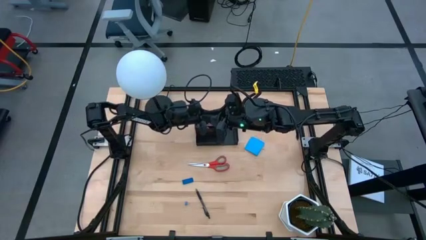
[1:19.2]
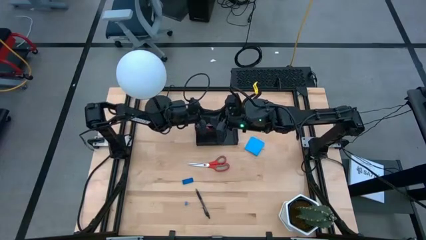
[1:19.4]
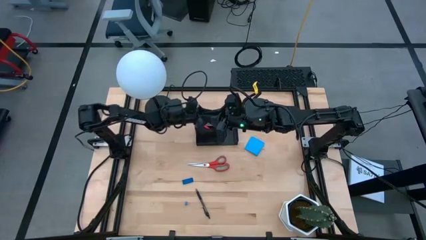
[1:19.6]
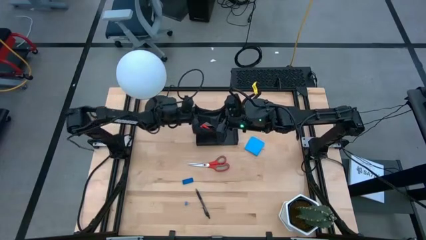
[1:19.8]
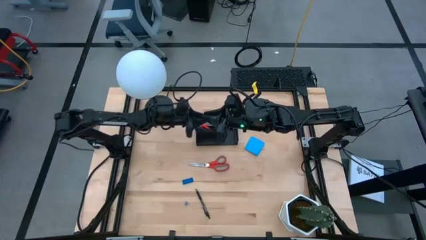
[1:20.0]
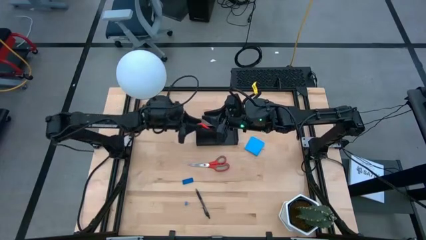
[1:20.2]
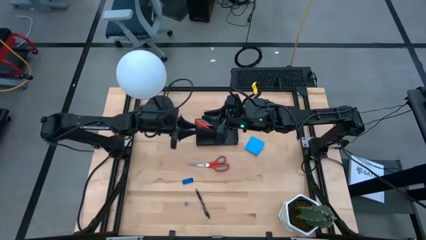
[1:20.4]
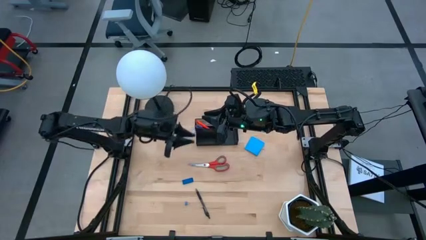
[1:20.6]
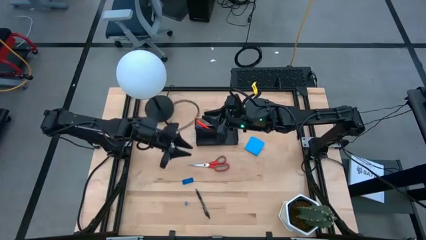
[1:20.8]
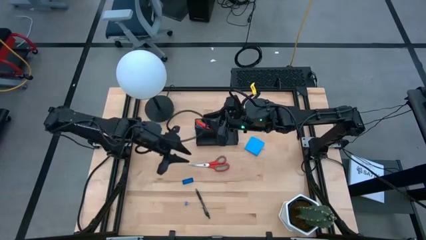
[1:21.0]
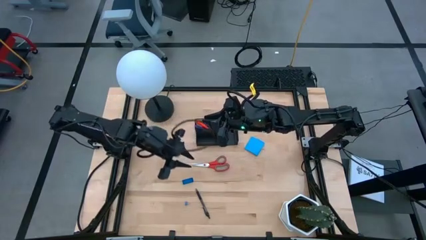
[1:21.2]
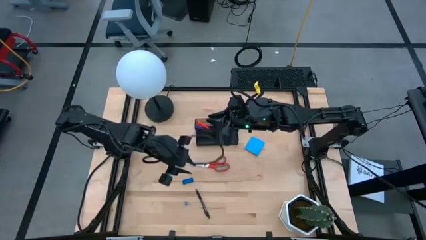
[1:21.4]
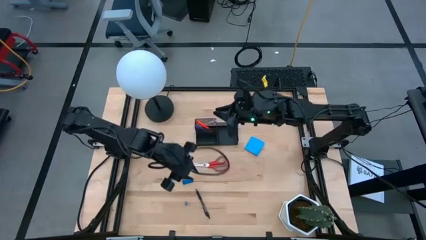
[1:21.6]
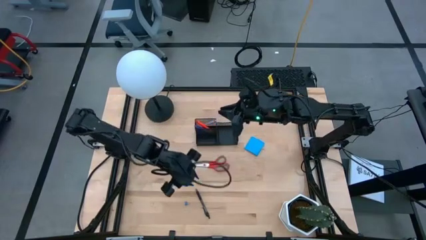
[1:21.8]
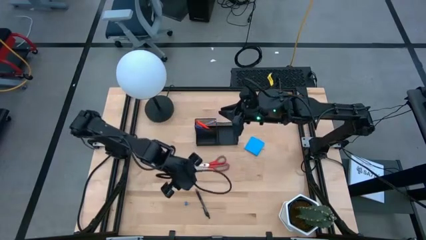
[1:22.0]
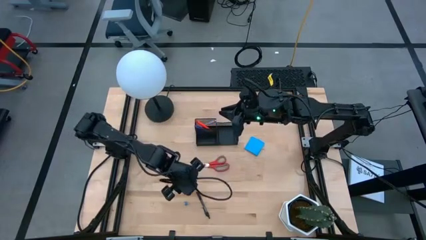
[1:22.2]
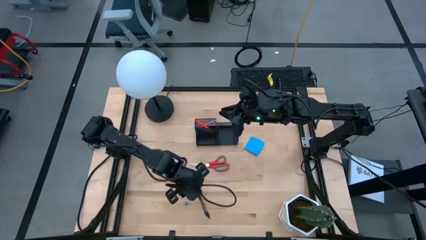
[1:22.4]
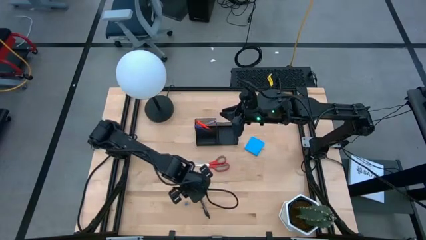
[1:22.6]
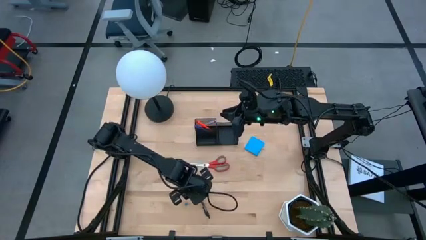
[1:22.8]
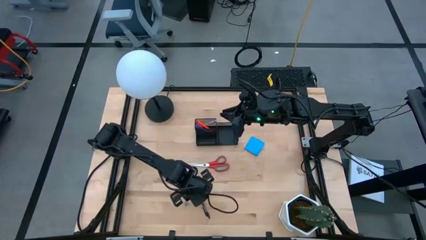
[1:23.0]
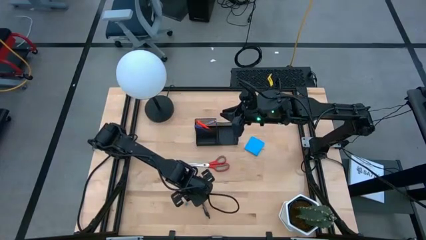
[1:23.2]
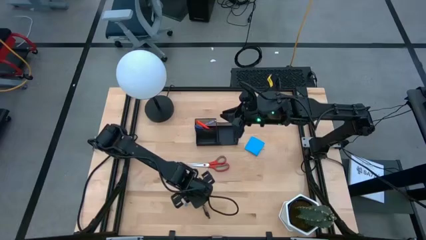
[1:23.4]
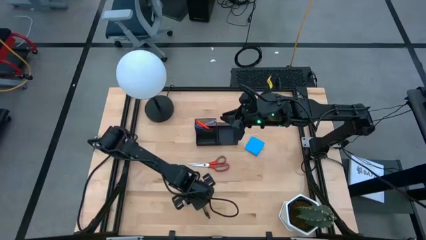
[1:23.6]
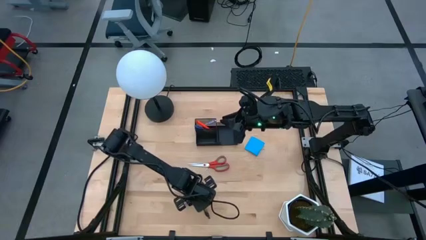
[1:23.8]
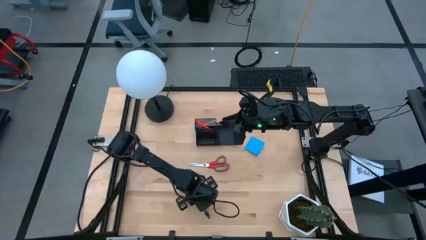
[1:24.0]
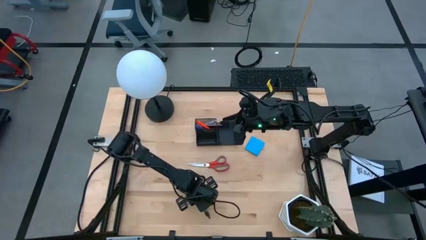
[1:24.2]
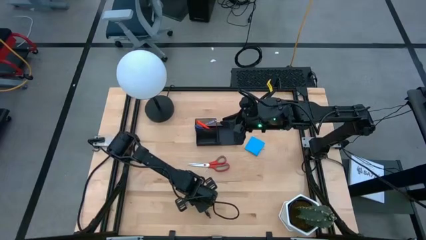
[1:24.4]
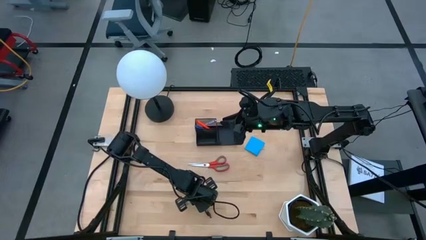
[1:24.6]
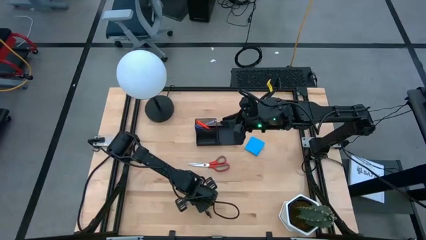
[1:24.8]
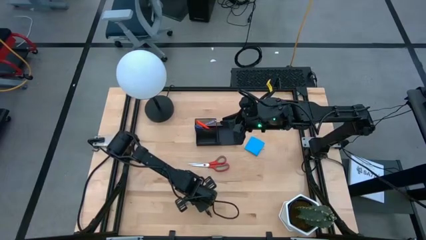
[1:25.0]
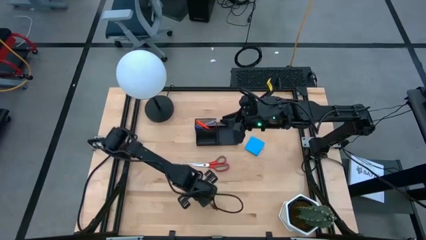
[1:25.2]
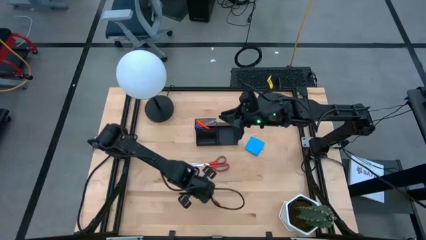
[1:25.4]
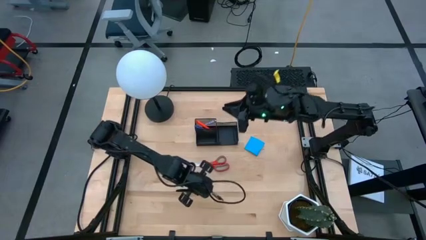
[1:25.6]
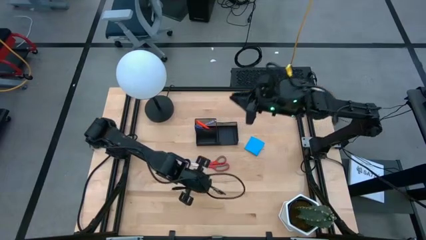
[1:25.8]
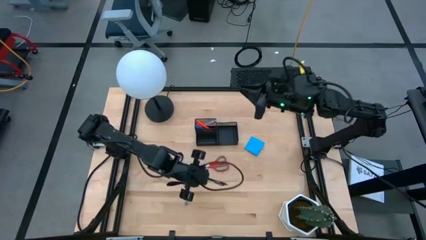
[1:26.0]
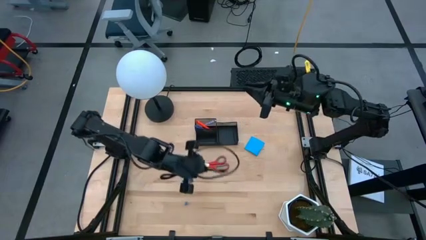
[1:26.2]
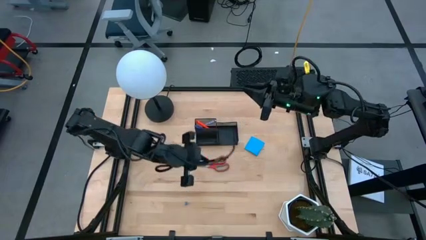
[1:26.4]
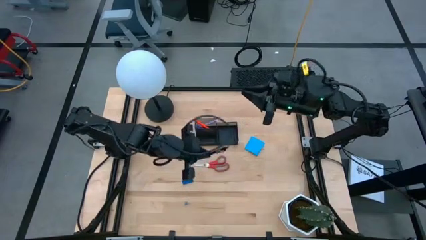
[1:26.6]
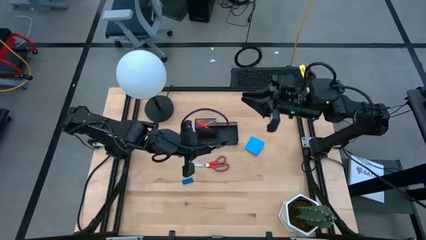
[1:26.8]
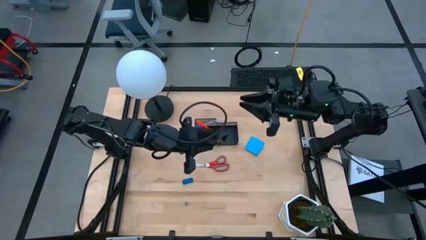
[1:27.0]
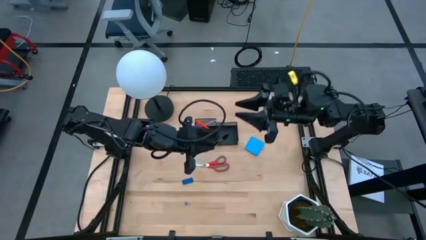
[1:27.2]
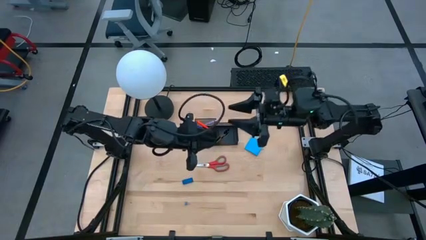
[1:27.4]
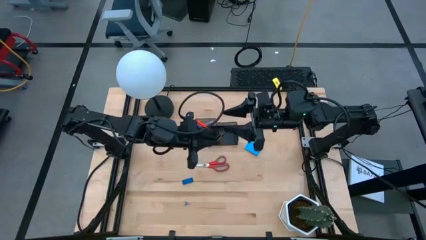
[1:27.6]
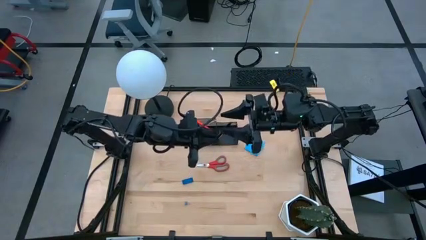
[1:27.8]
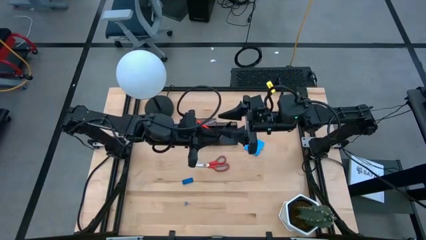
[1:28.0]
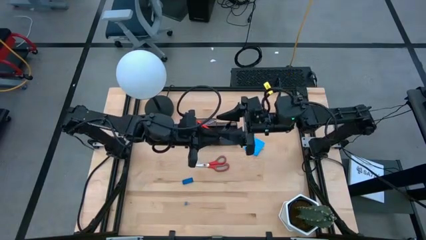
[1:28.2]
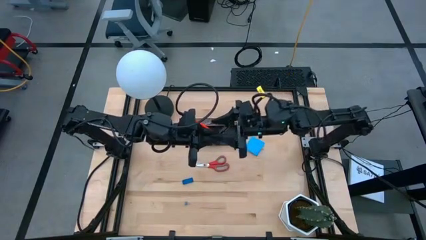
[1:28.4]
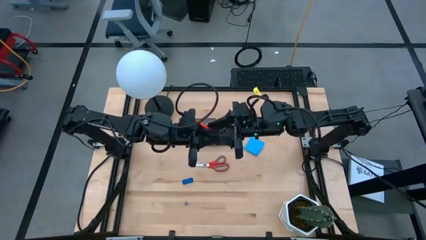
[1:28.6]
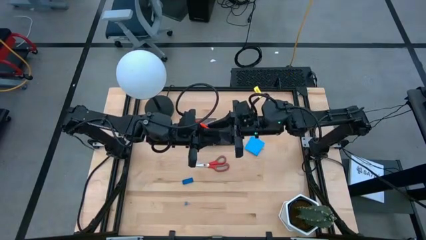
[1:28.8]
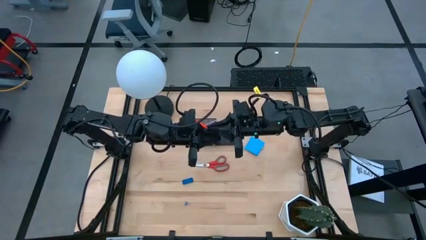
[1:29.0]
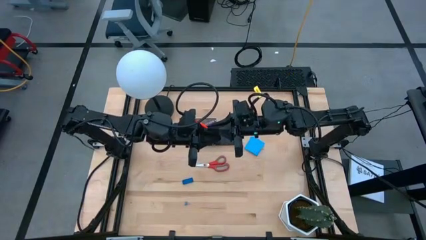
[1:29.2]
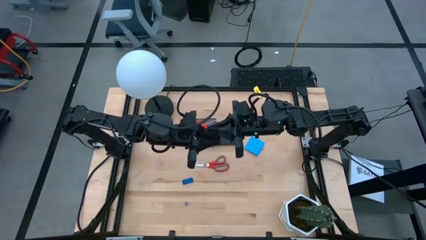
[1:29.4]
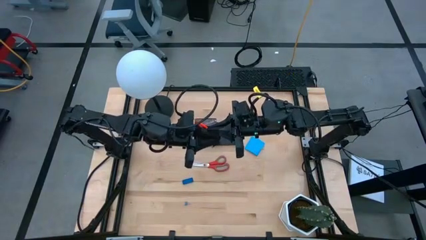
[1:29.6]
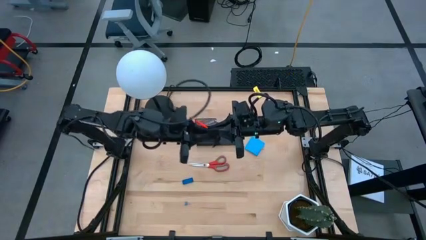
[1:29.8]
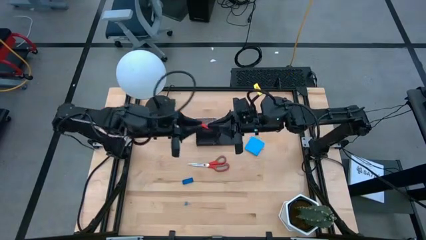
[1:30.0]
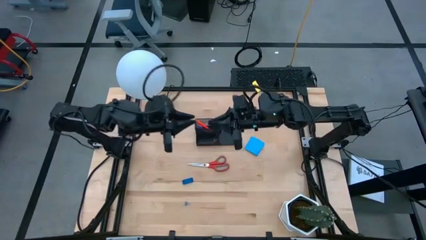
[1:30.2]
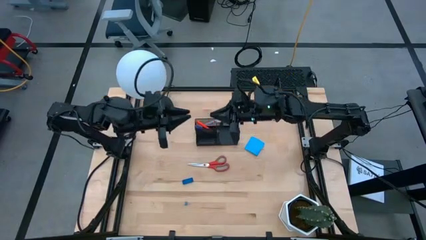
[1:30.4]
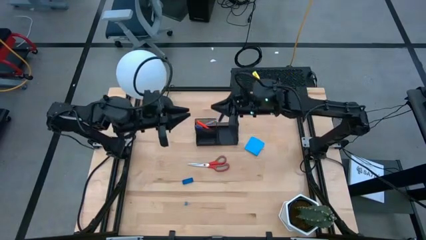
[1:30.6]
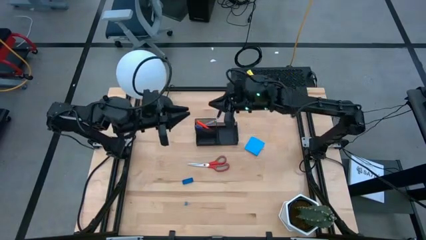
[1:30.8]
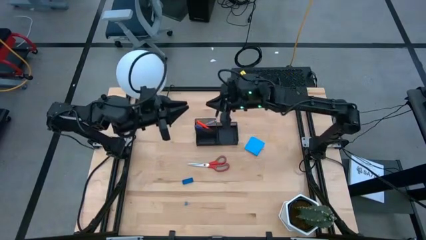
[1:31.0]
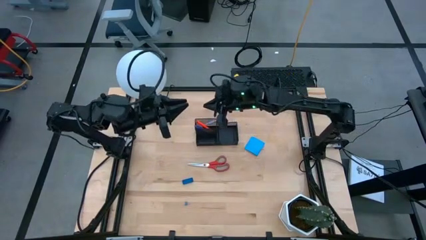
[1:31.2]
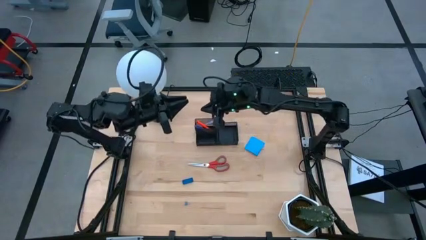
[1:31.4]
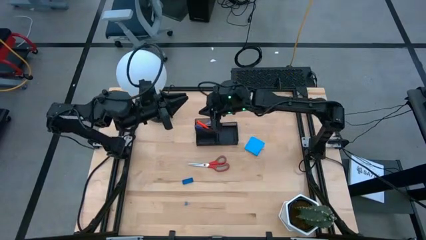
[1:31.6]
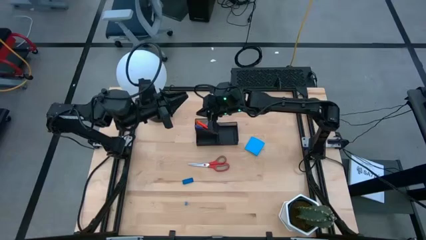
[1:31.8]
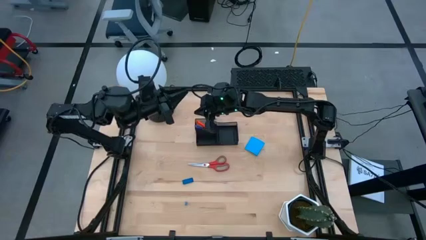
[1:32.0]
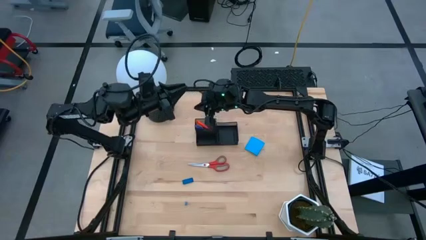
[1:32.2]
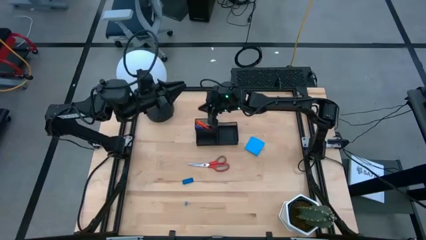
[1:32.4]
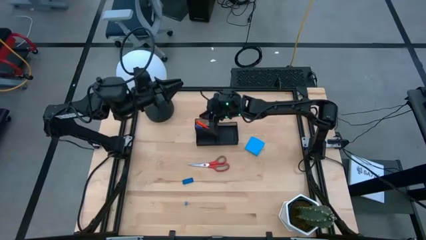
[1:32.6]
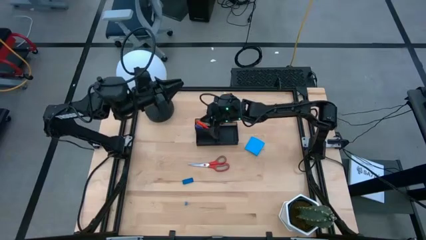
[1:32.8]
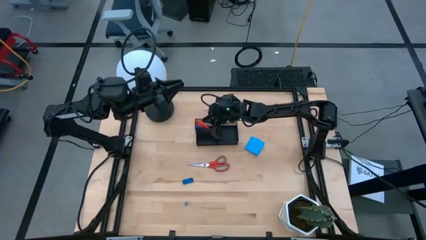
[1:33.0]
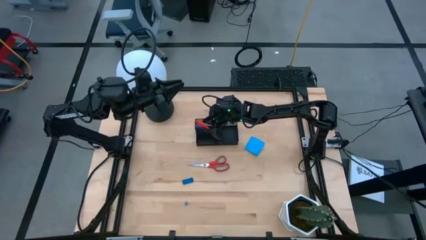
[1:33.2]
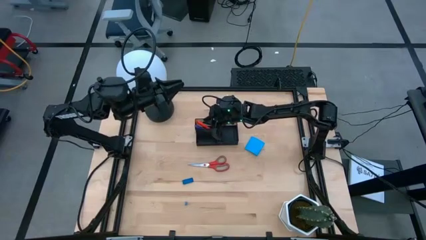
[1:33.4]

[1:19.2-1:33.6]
Task: Pick and place office supplies into organizer
Put the black pen into the black desk organizer

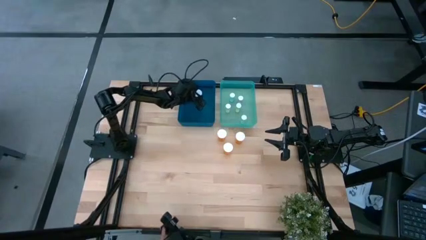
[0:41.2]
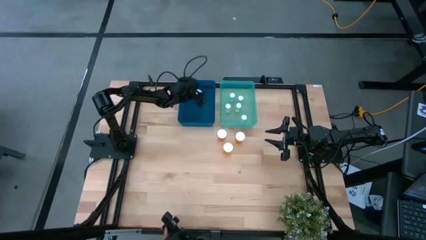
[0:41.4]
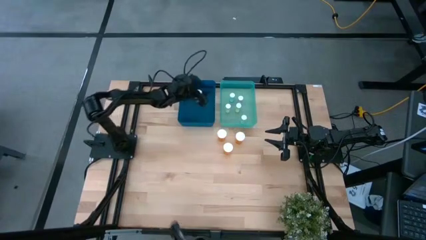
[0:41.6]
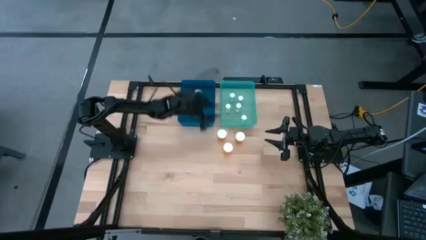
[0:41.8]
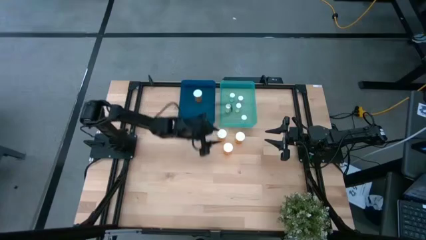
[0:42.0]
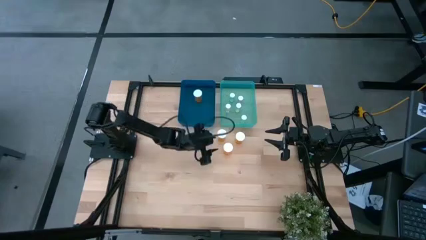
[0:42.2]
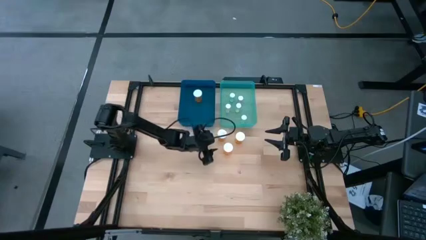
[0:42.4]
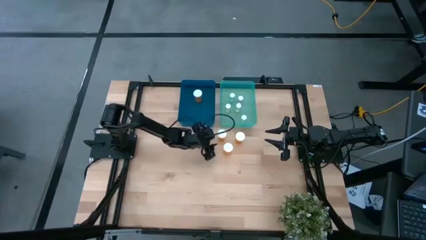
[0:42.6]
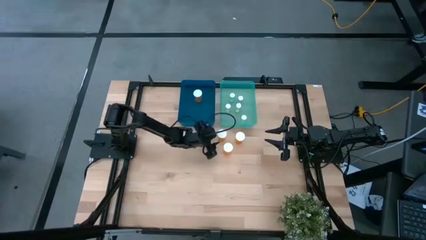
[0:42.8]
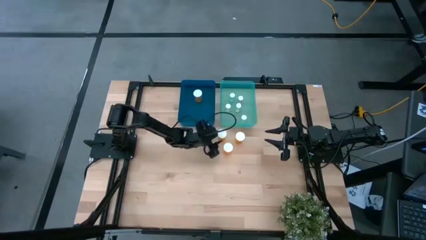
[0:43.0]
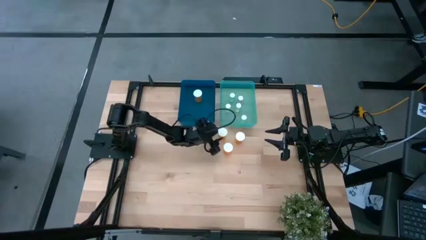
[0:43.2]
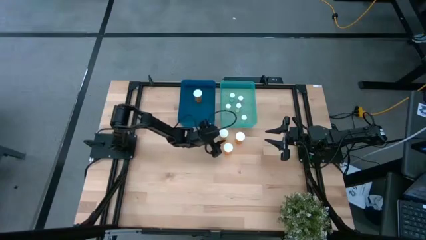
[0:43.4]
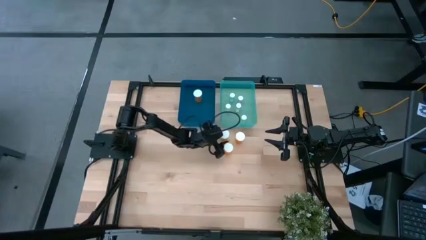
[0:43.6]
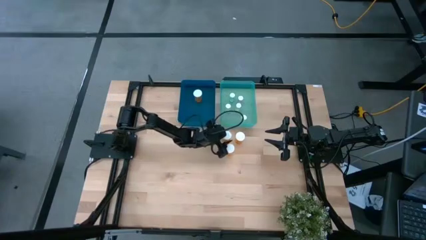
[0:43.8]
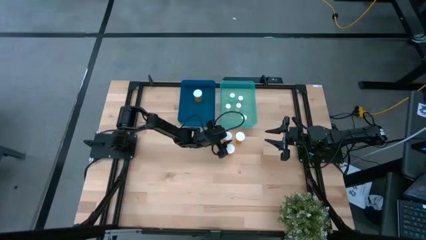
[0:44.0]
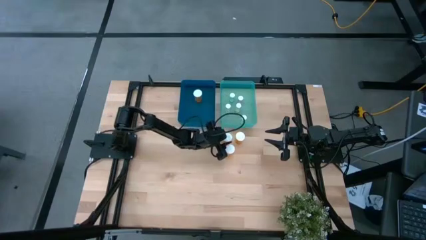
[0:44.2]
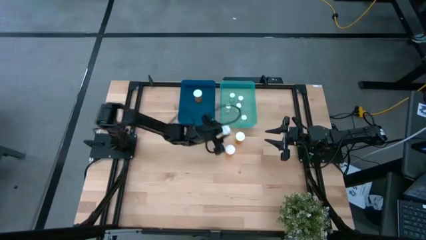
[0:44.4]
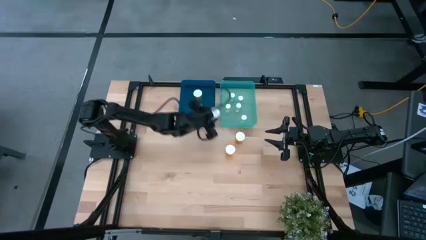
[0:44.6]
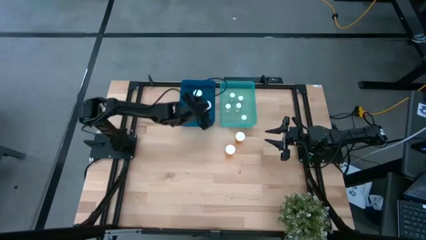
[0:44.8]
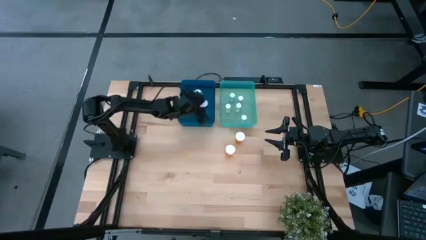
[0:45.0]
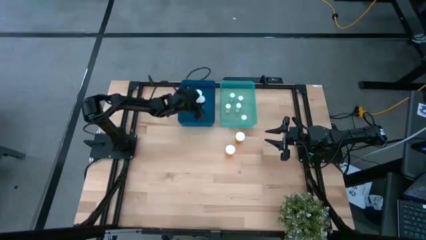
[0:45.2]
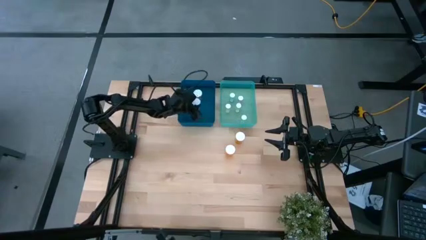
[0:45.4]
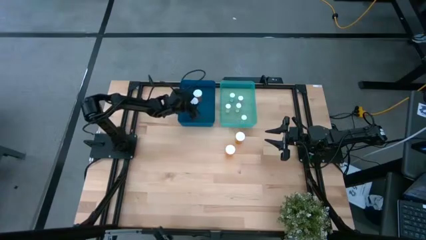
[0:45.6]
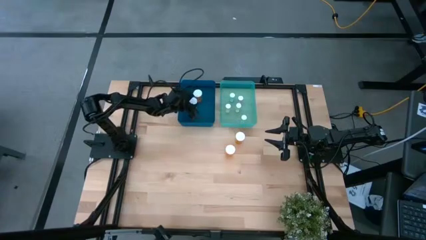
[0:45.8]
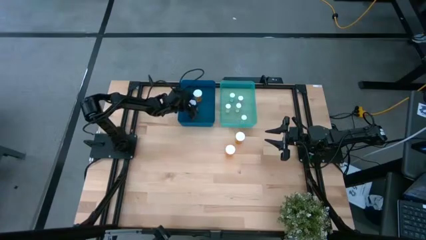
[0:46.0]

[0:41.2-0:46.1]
Task: Pick and place medicine bottles into bin by pill shape (circle, oval)
Put the orange capsule bottle into the blue bin
